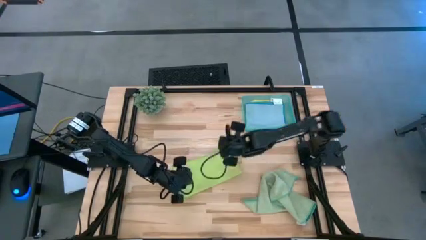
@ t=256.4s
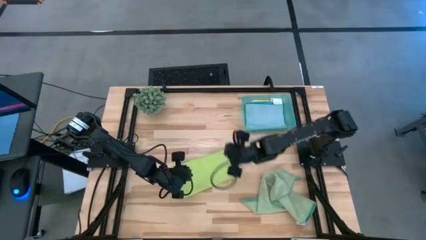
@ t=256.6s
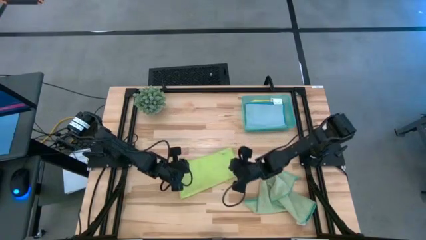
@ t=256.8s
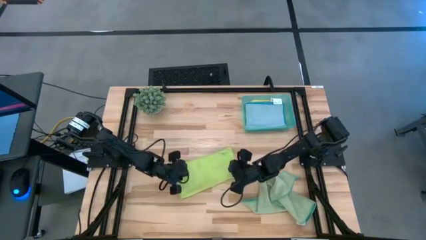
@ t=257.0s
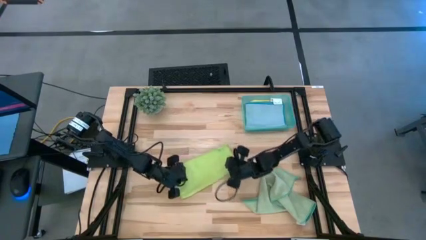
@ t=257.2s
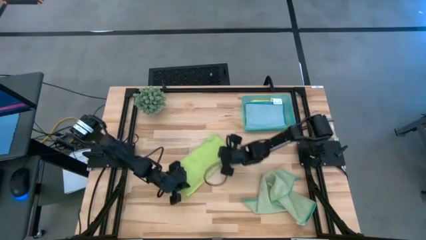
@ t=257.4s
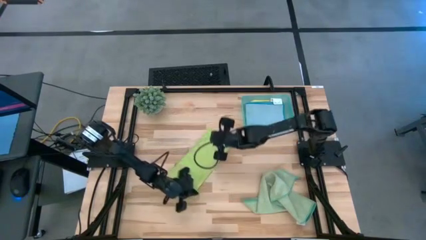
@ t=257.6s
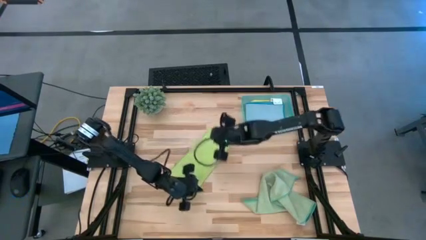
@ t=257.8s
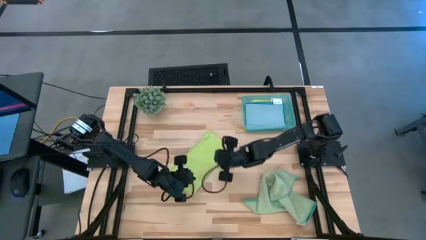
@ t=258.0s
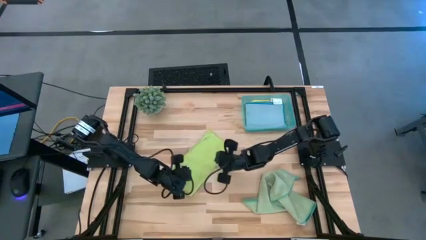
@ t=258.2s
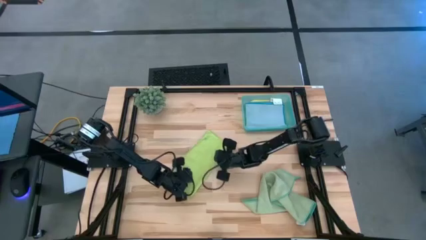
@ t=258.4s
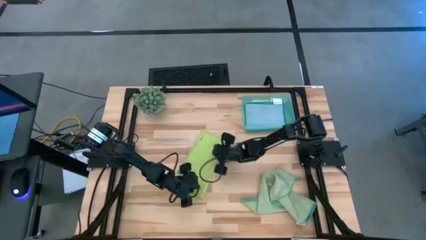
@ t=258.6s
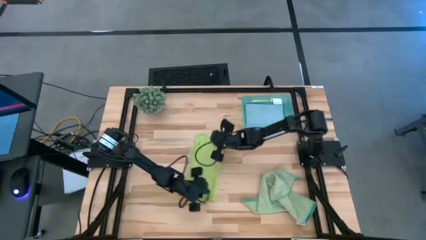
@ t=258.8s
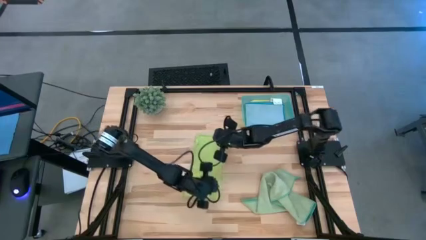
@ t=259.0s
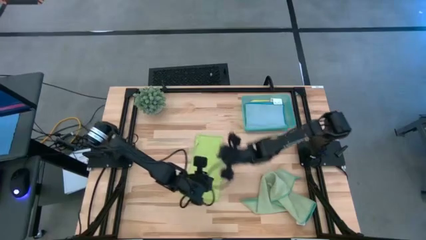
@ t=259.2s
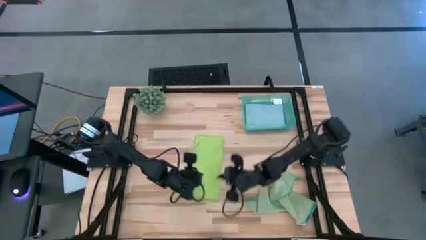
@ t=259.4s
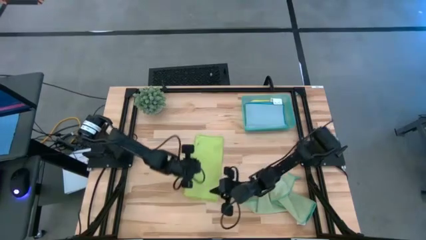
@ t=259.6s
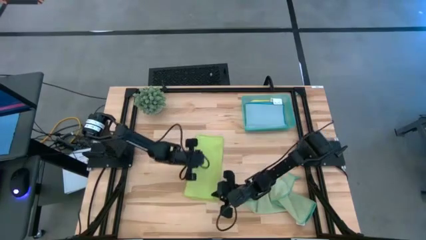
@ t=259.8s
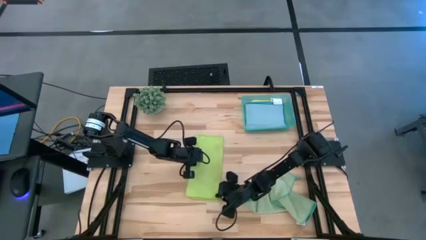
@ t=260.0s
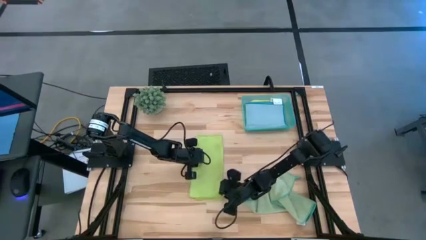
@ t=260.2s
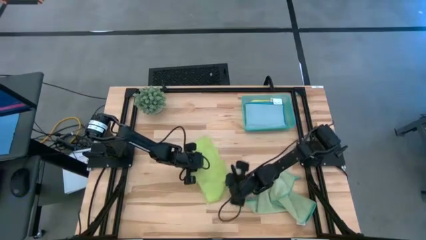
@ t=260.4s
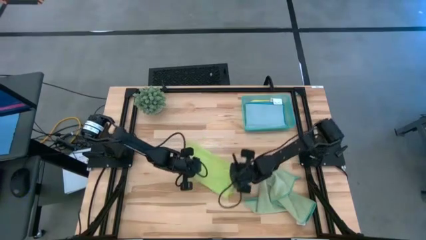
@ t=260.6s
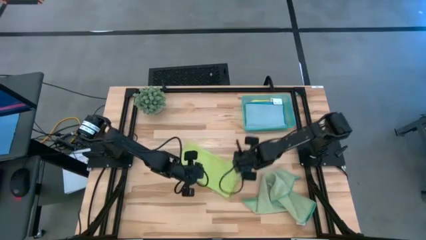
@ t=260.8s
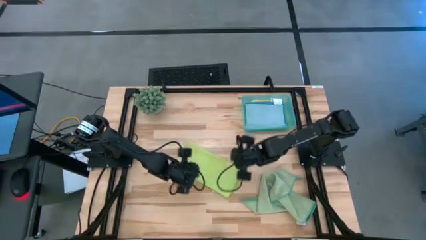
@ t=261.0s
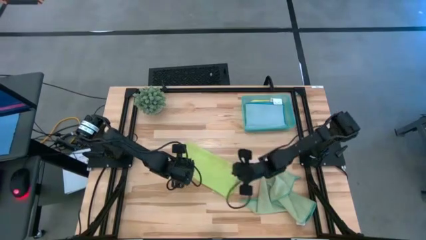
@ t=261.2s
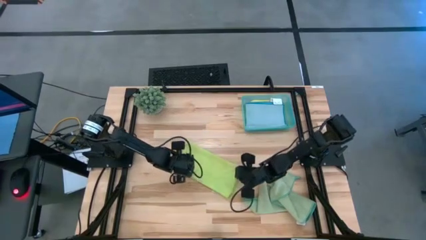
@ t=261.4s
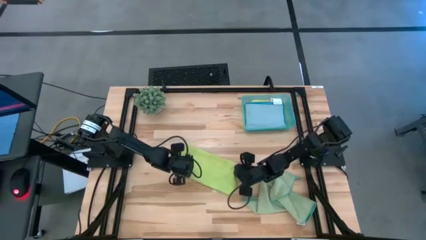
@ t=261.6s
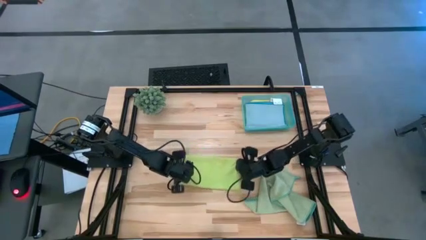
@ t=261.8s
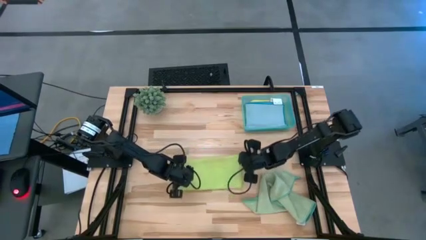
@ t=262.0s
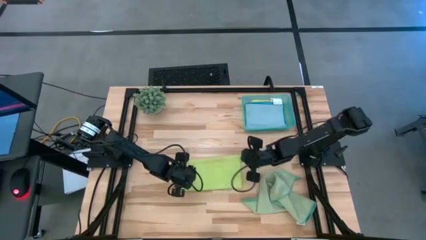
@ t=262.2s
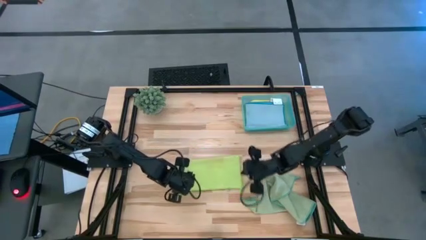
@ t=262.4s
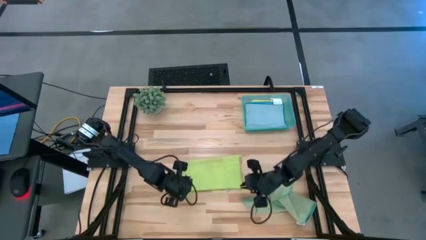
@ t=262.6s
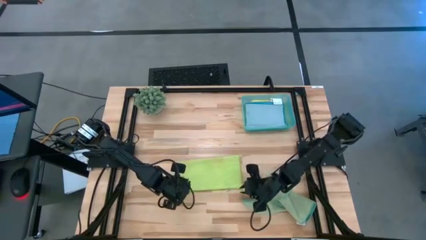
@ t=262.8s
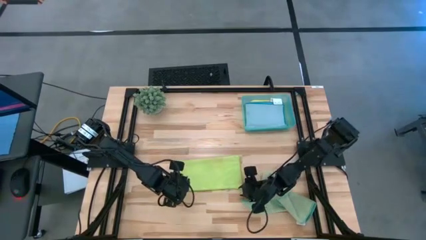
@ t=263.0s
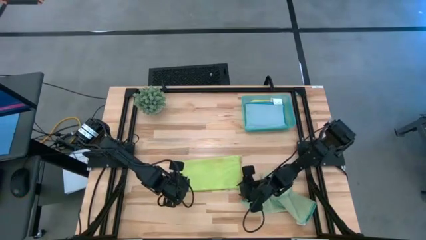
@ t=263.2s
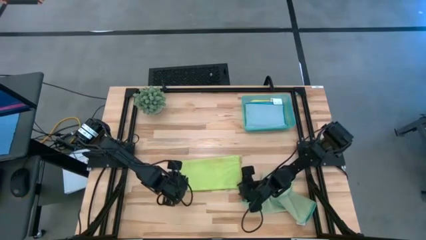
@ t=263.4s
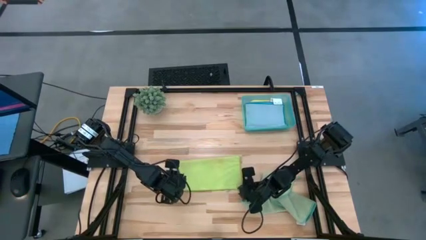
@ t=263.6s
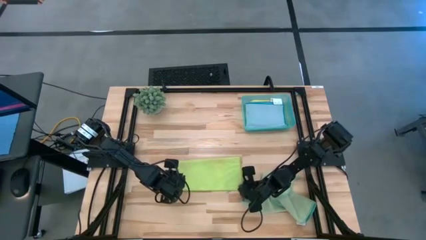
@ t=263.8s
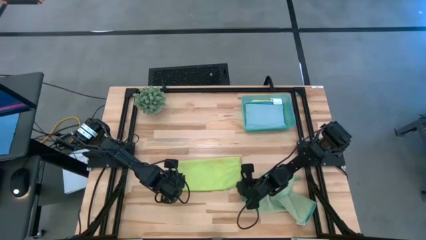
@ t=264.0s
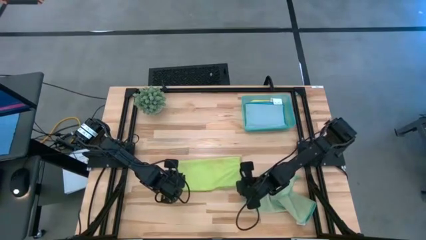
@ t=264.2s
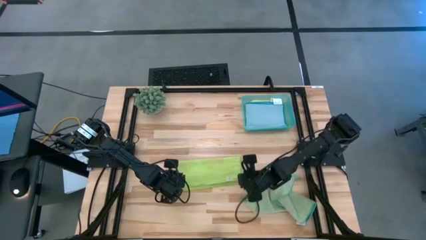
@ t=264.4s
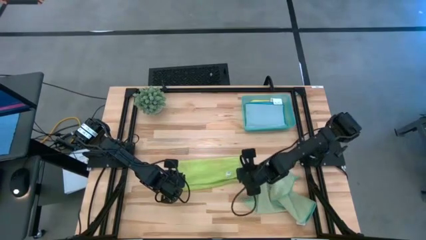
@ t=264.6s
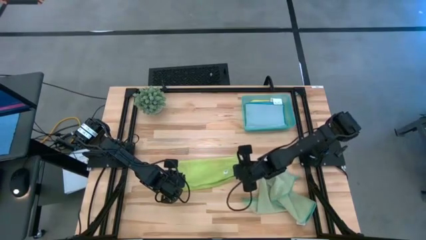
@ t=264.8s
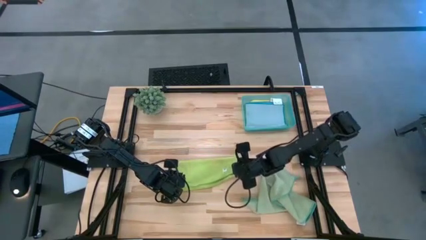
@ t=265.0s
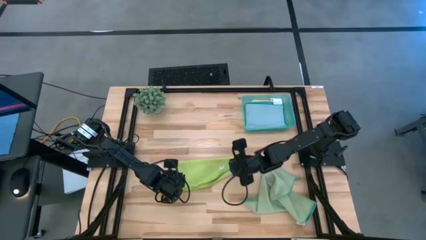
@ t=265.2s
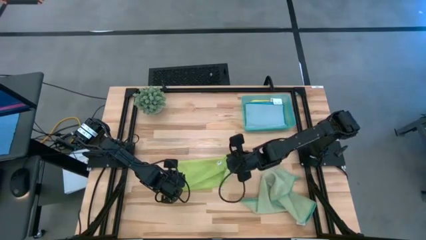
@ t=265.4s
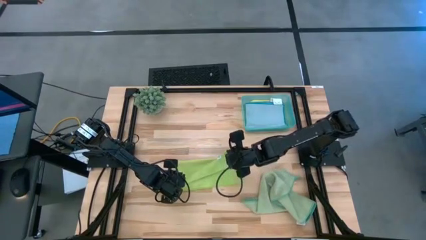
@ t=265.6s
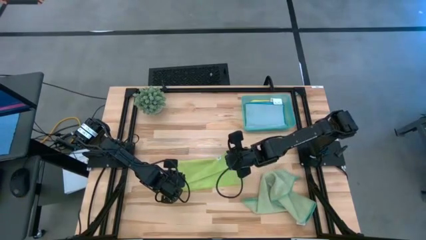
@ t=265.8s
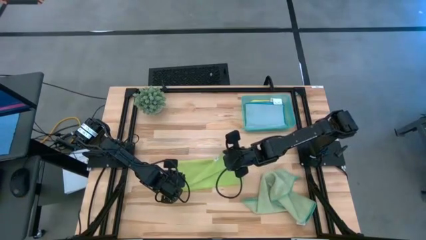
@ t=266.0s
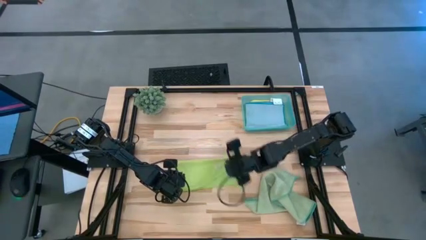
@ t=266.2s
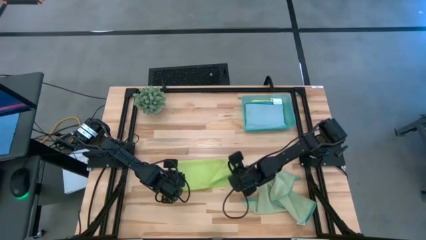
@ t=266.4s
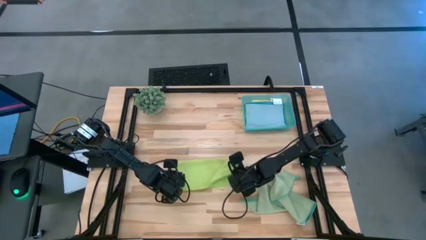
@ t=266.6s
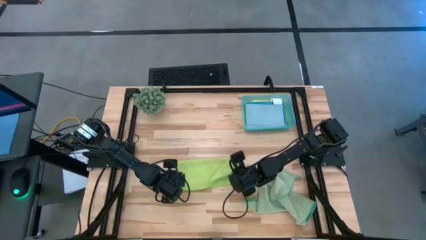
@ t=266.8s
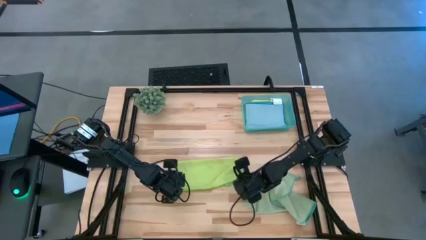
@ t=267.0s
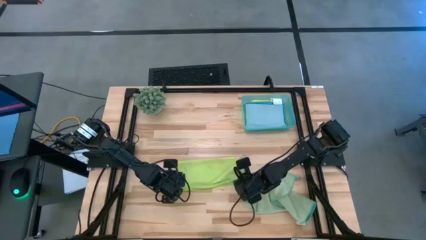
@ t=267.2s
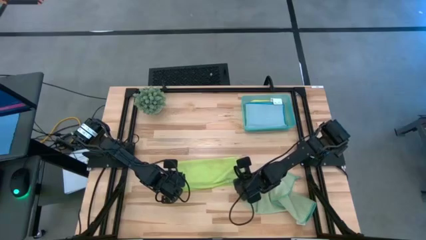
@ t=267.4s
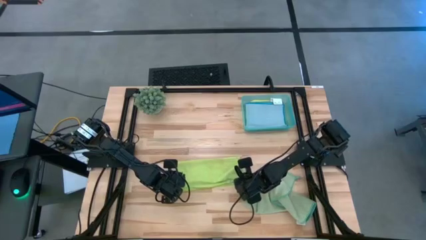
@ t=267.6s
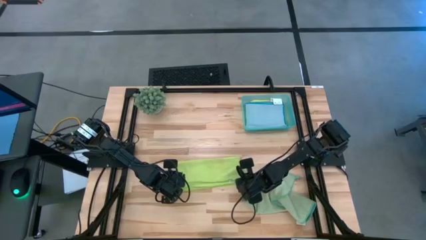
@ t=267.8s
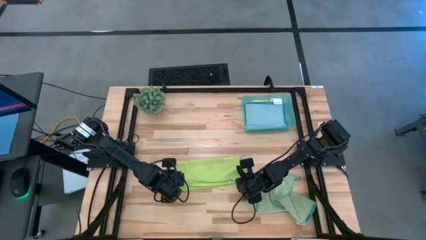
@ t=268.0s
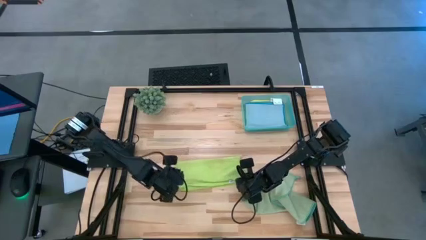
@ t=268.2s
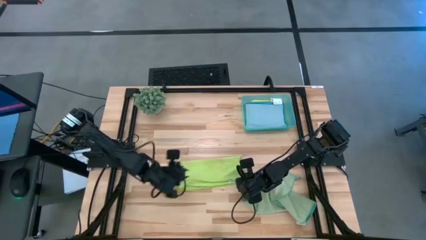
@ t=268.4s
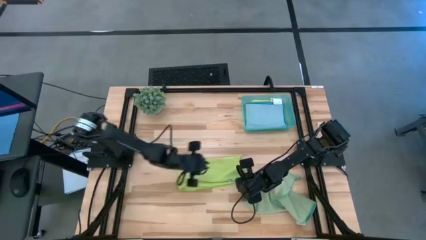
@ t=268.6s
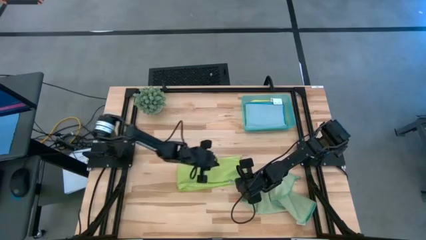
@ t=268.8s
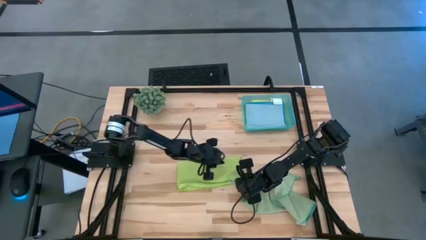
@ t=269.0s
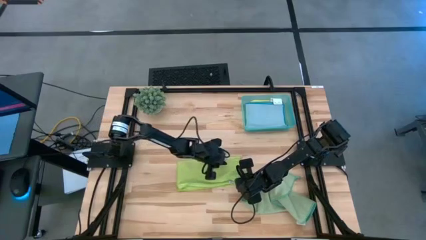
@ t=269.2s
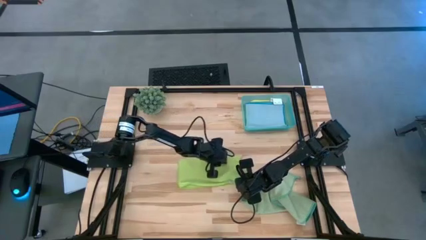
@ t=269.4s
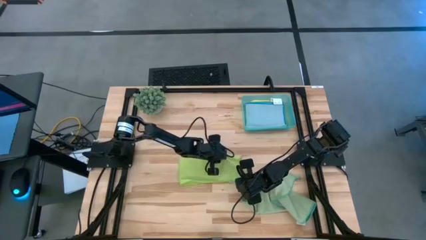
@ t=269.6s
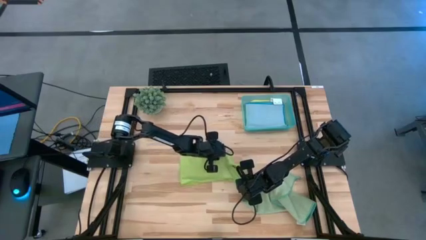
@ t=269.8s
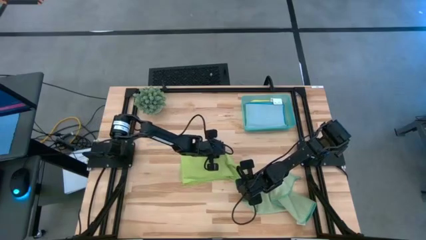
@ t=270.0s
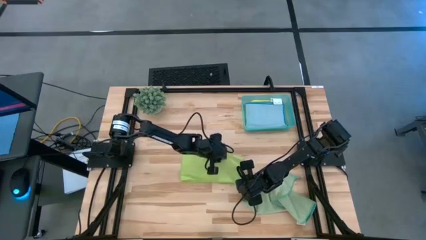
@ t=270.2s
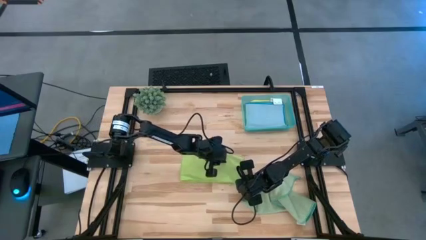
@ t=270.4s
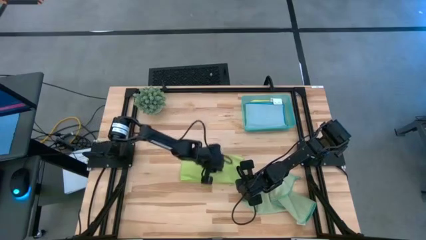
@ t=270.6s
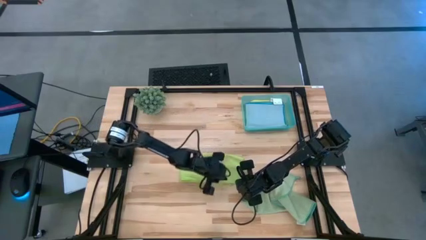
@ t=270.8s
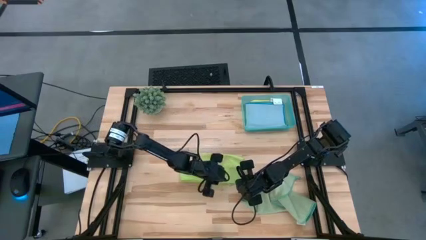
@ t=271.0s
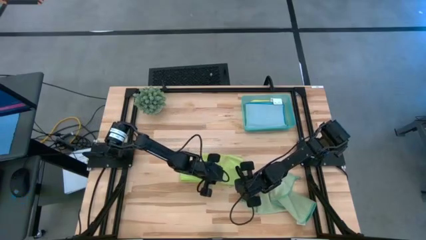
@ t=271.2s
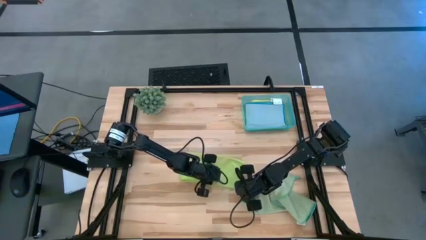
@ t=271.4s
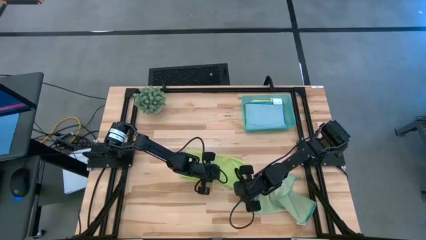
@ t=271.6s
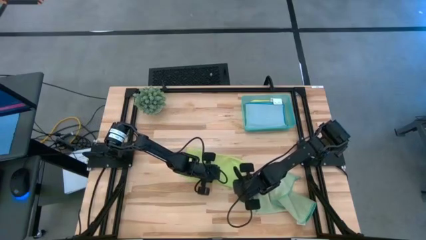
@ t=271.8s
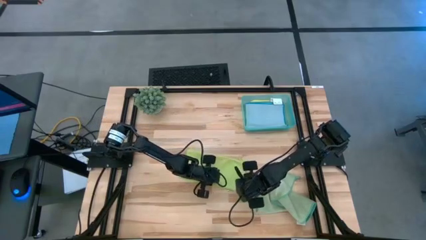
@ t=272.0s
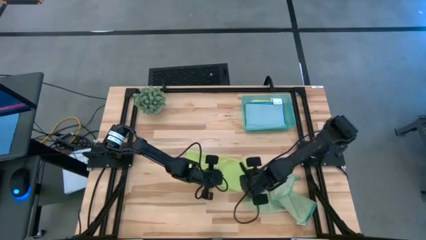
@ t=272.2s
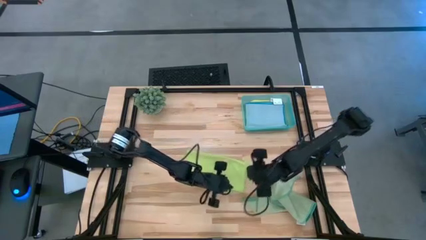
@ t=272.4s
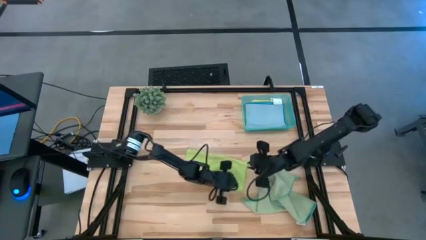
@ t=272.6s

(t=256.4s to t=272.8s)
Task: Fold microfiber towels
Fold the green microfiber cloth
